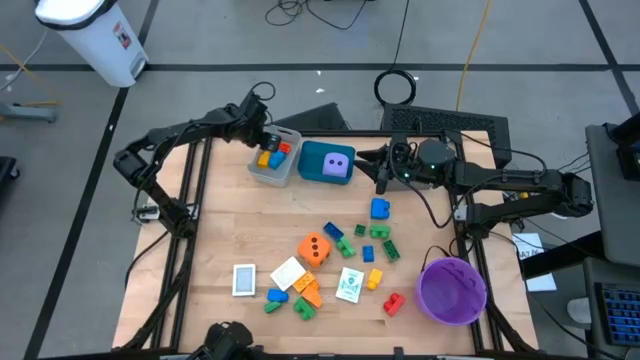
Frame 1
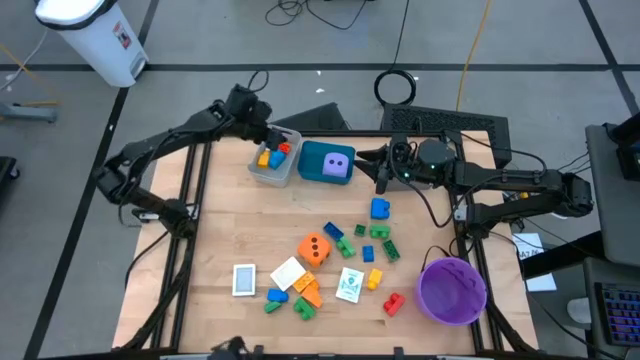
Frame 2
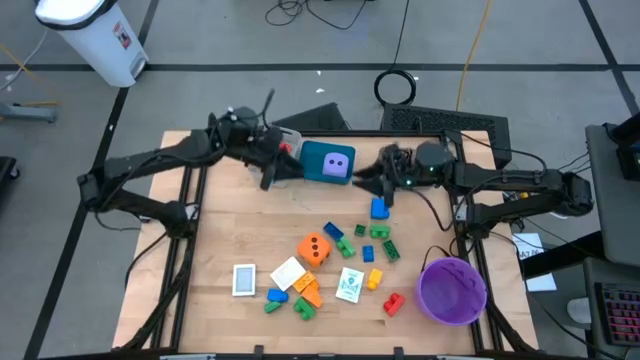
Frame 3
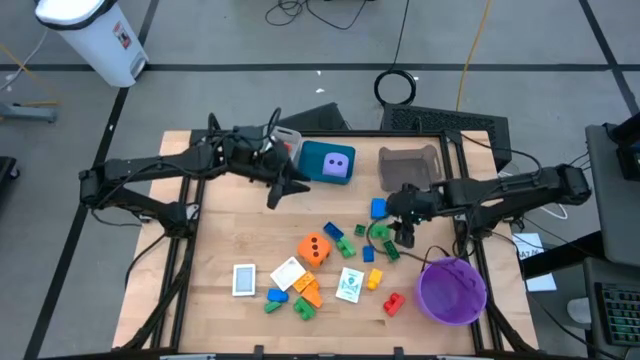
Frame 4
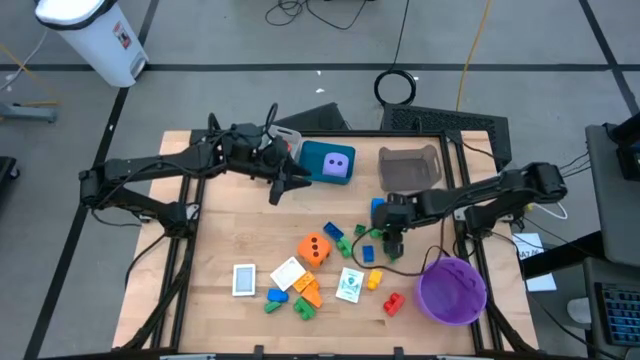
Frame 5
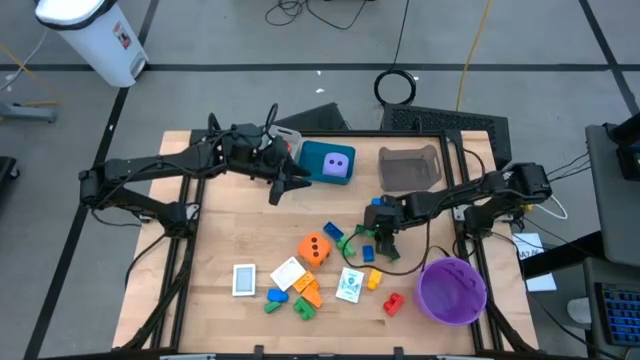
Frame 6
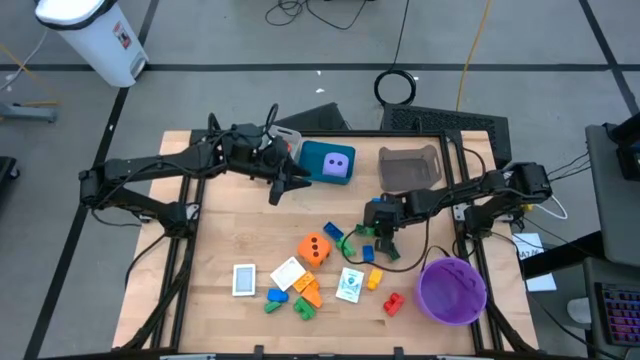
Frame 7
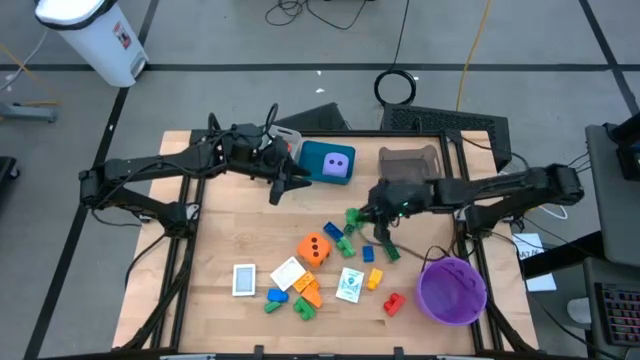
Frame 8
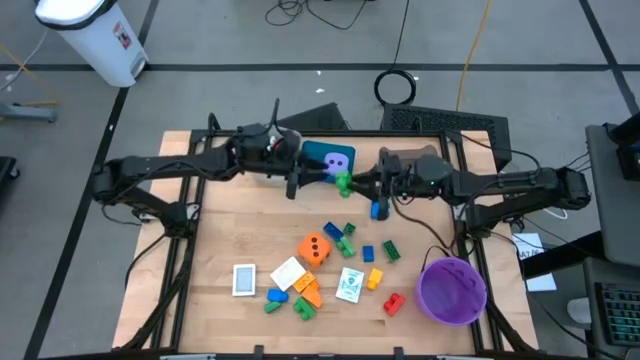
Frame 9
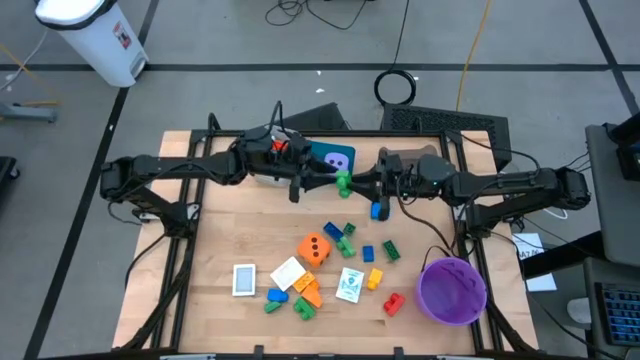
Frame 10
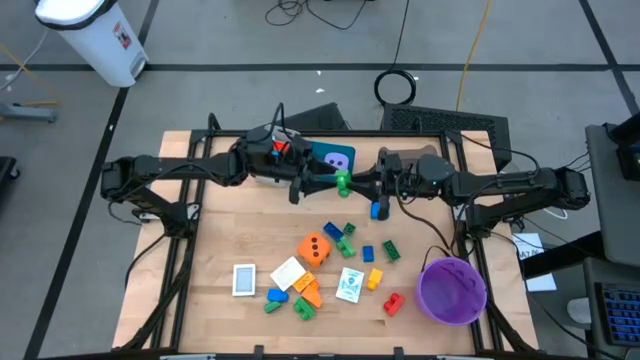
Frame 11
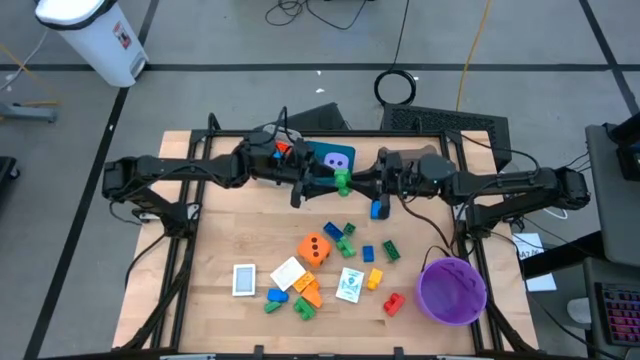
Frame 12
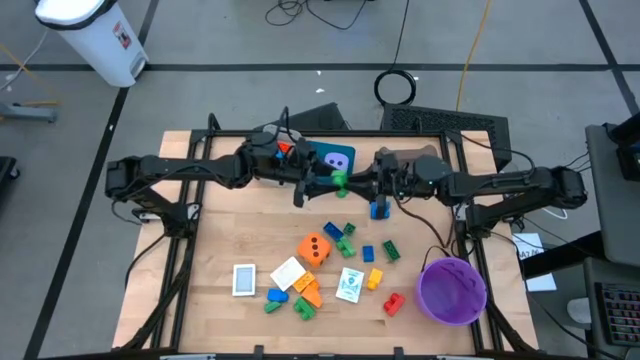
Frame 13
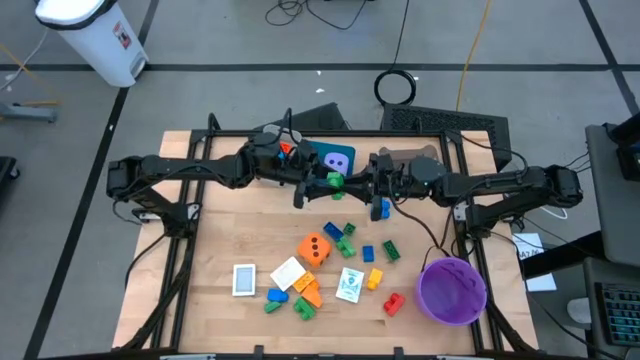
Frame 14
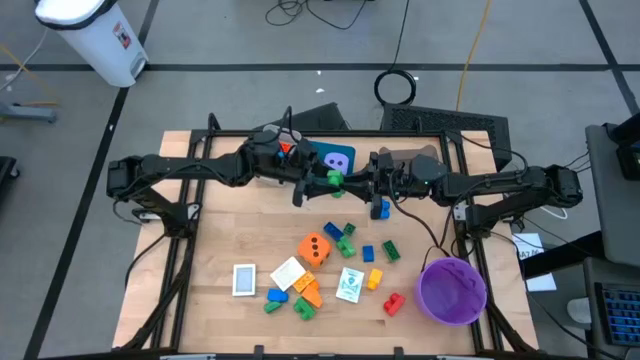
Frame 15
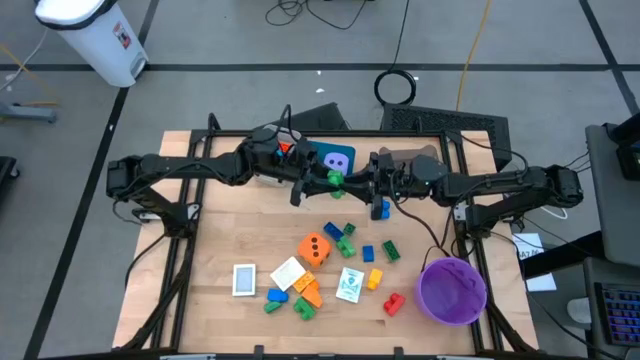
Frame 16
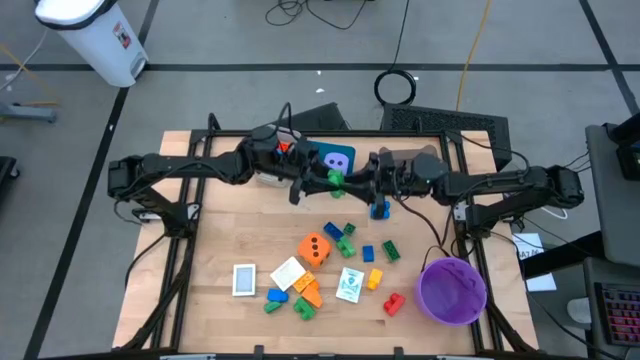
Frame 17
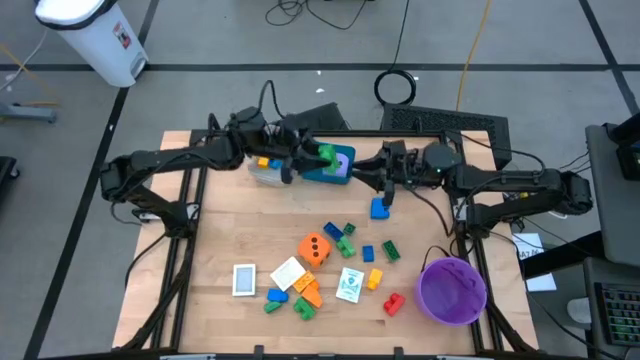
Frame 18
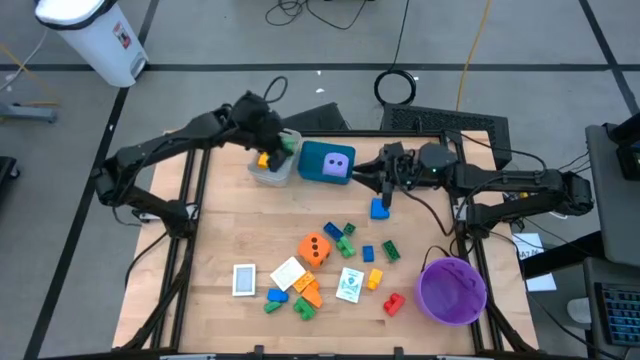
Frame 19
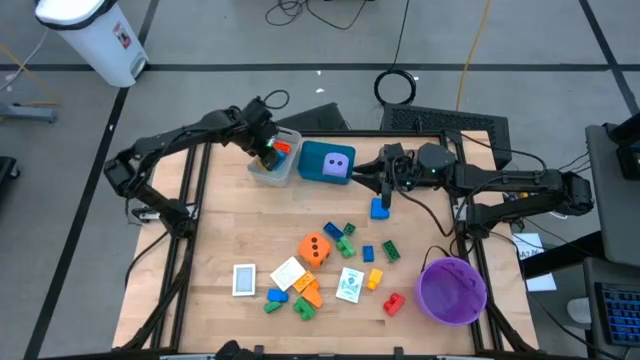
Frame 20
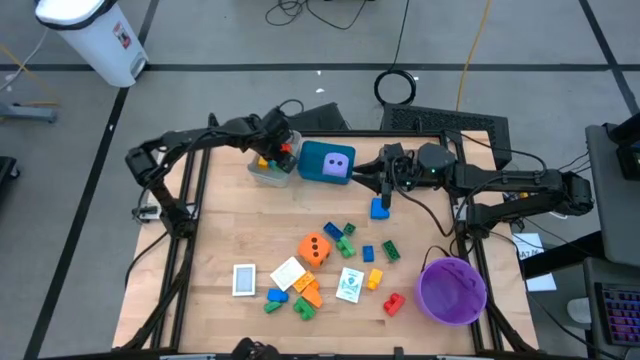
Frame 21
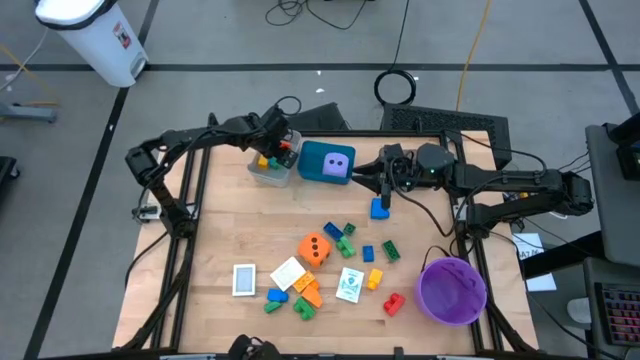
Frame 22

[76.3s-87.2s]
Task: Pick & Place Toys
Put the green game piece into the gray bin
